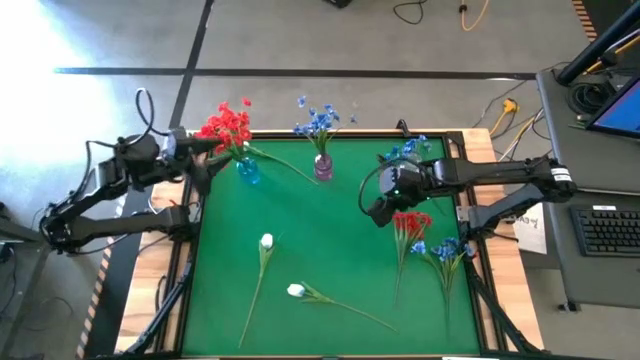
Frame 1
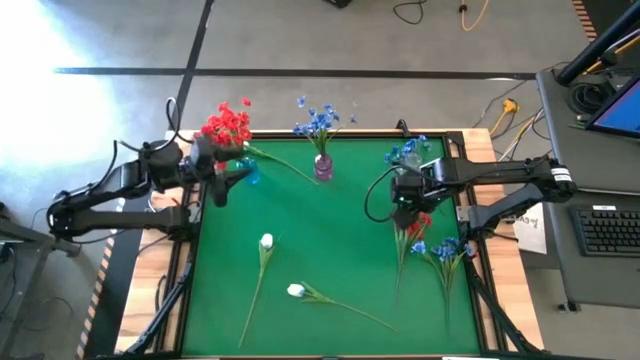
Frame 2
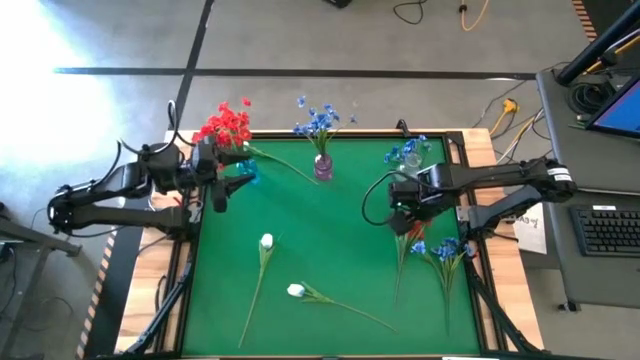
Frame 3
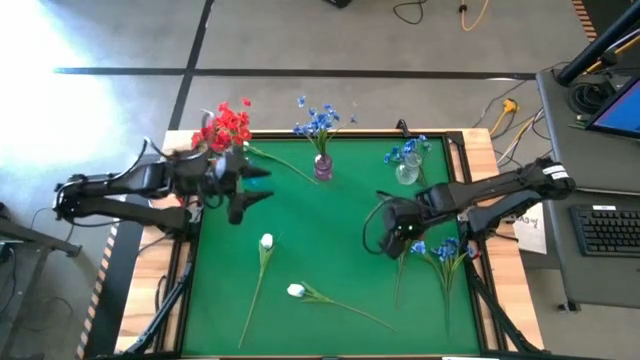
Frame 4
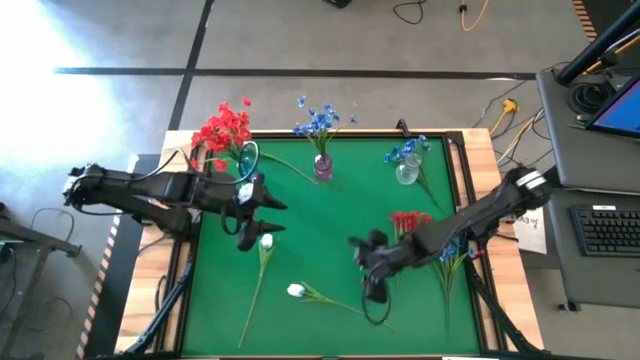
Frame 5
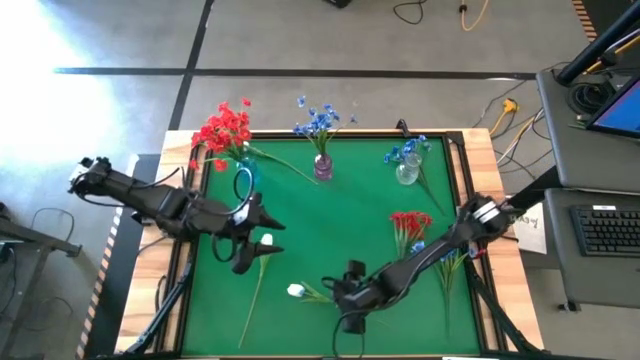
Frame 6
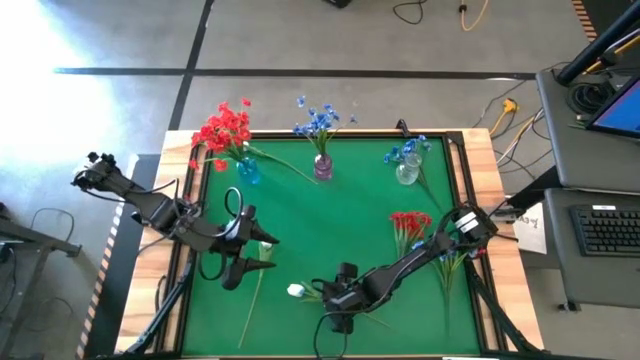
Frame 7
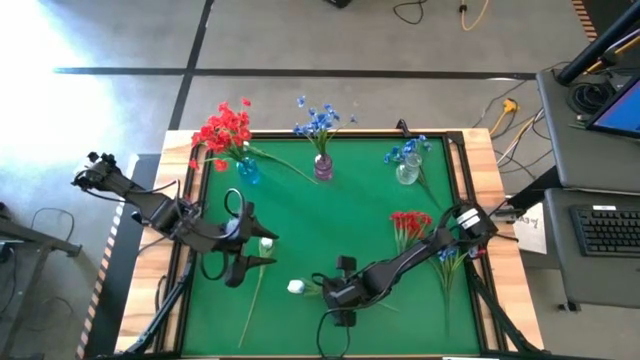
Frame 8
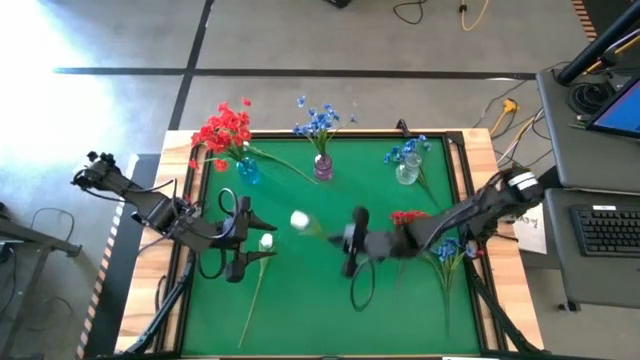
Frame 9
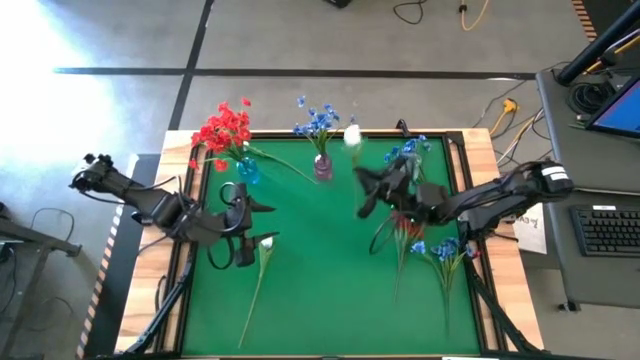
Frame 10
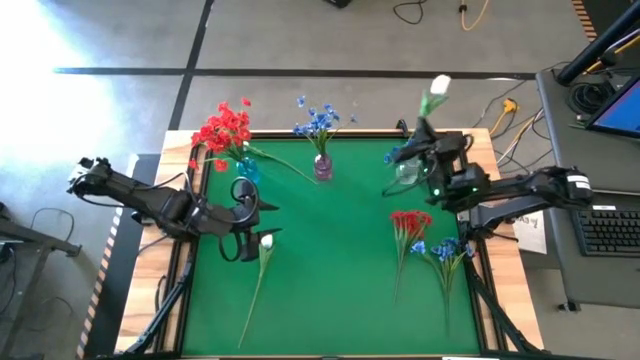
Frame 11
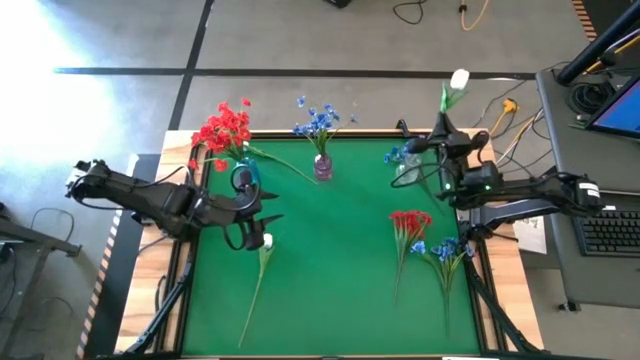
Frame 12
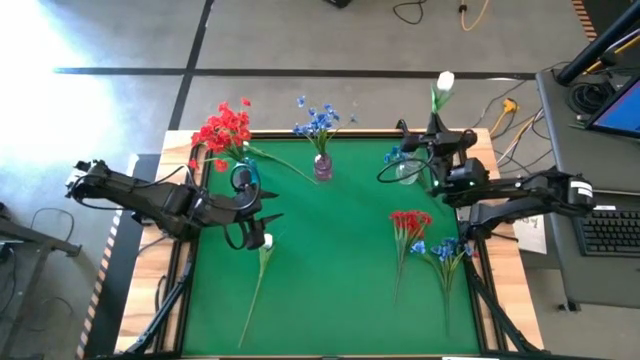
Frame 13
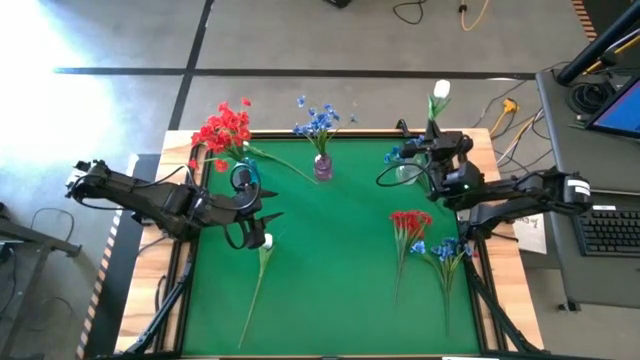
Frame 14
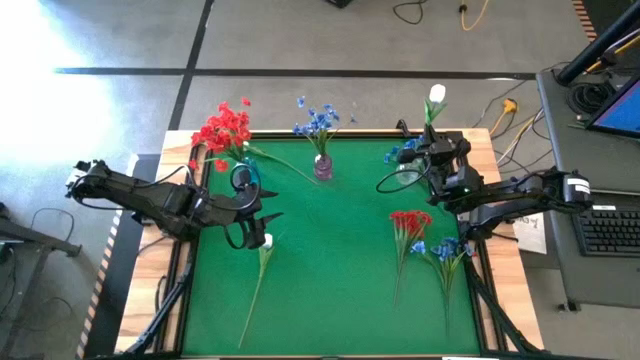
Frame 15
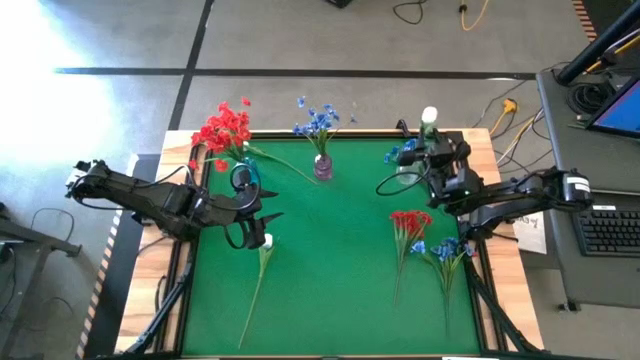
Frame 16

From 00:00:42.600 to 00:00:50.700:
Task: Sort flowers into vase by color
Put the right white flower into the transparent vase

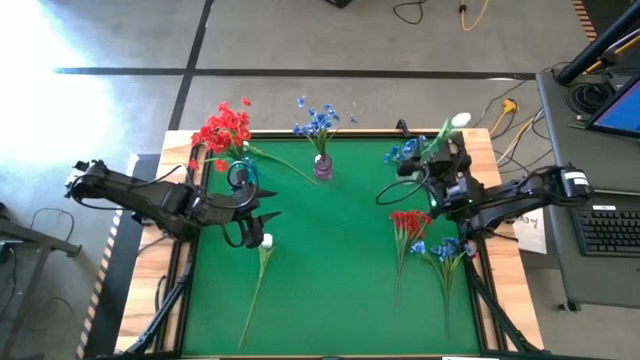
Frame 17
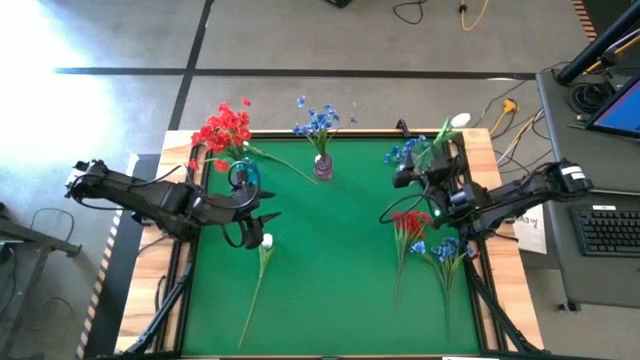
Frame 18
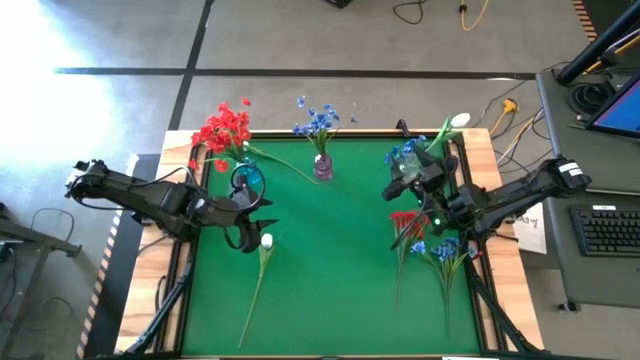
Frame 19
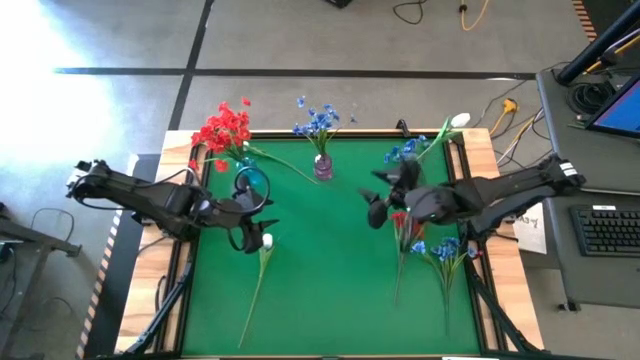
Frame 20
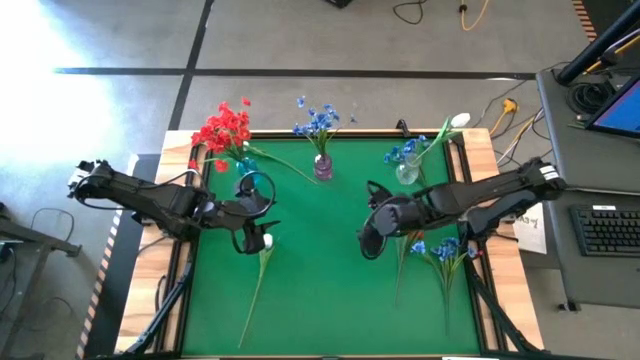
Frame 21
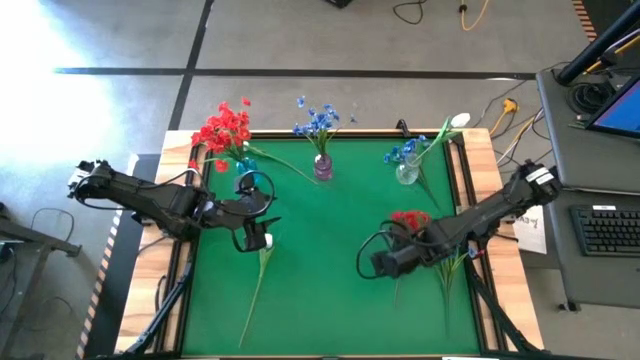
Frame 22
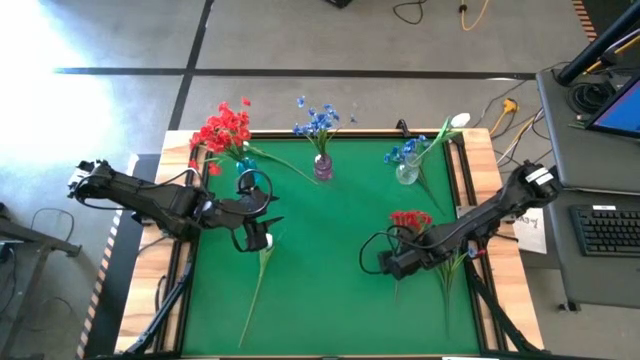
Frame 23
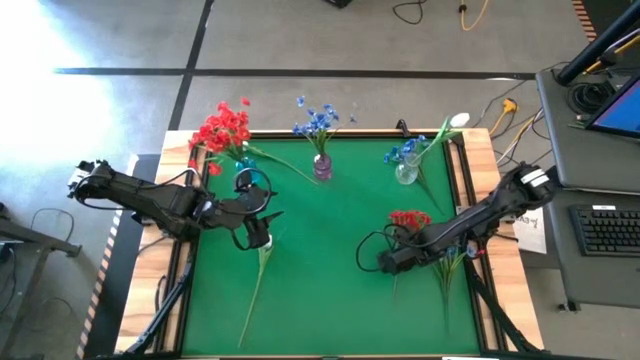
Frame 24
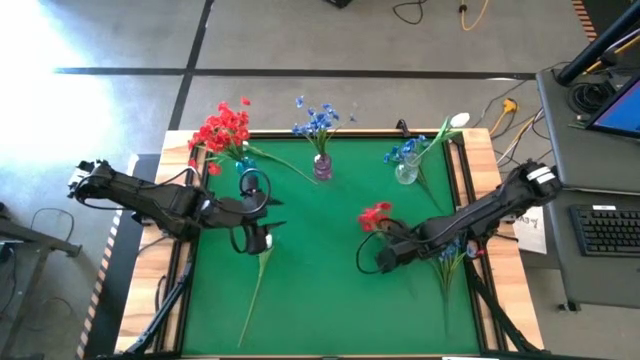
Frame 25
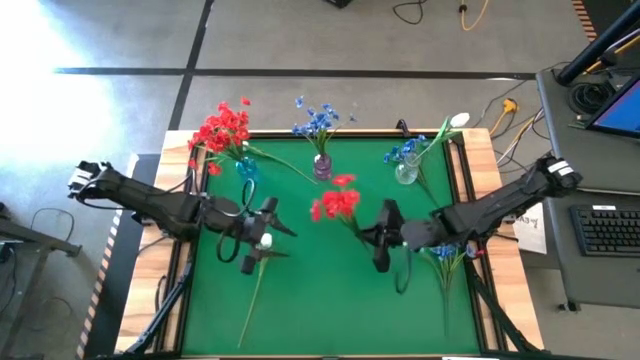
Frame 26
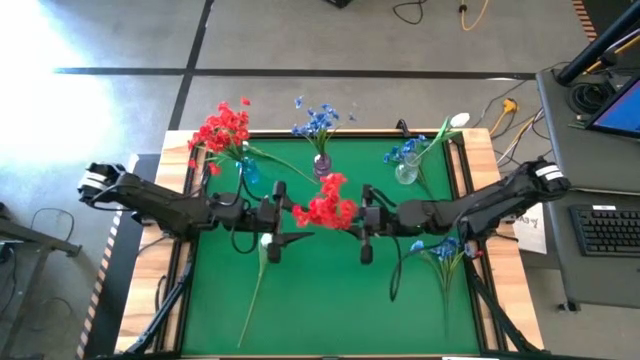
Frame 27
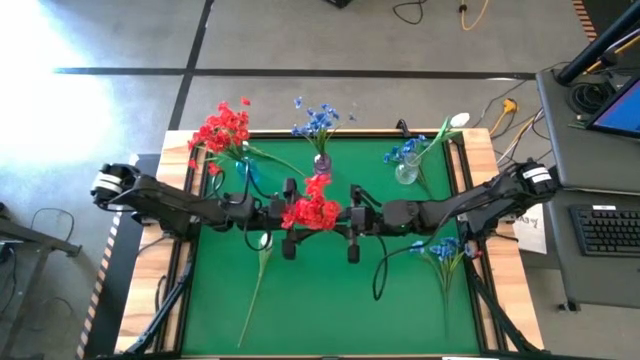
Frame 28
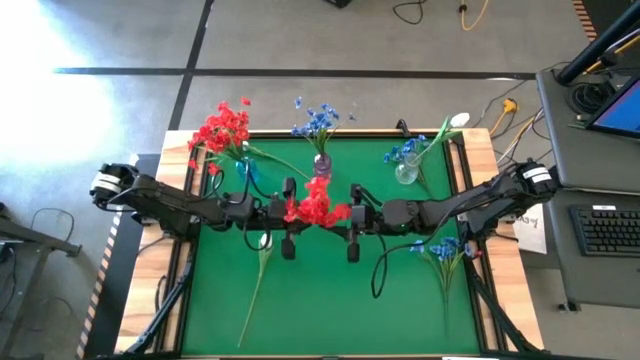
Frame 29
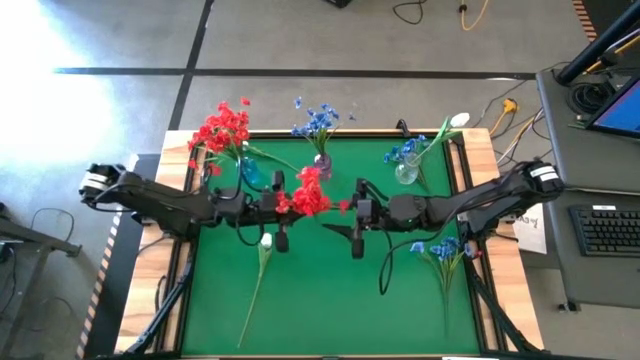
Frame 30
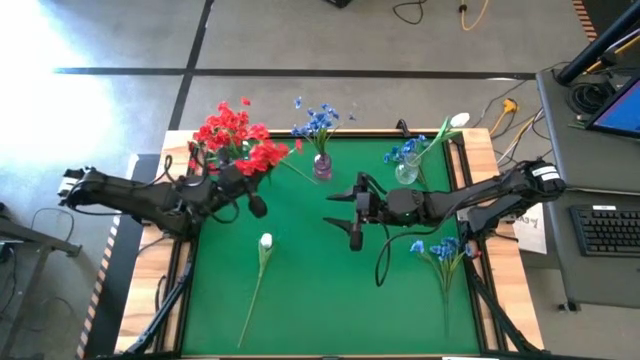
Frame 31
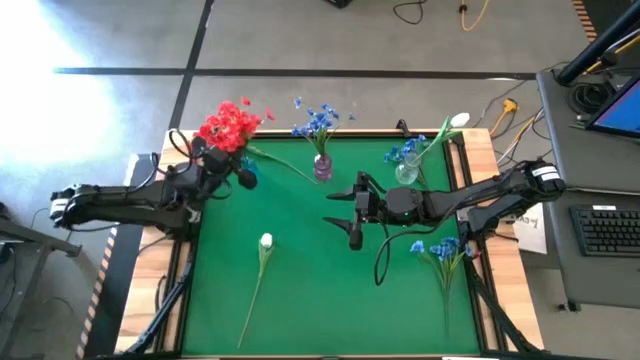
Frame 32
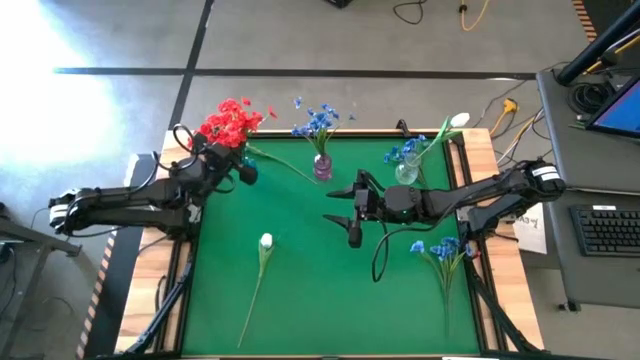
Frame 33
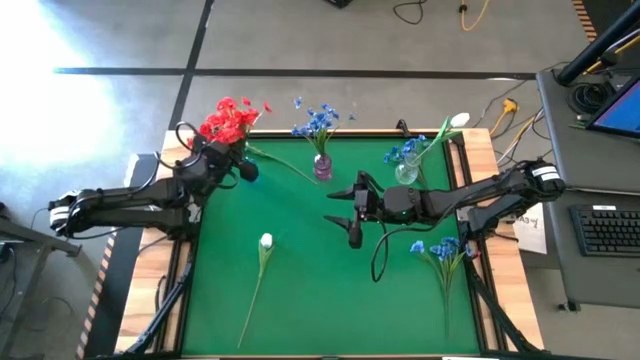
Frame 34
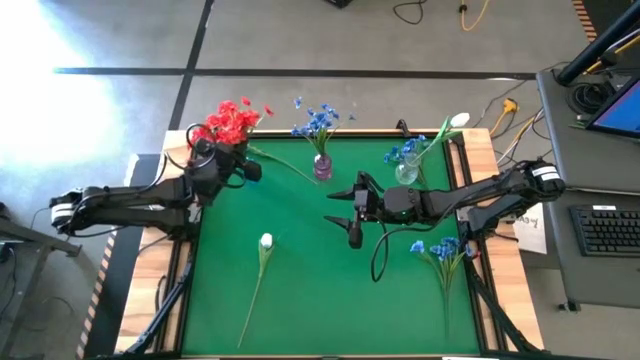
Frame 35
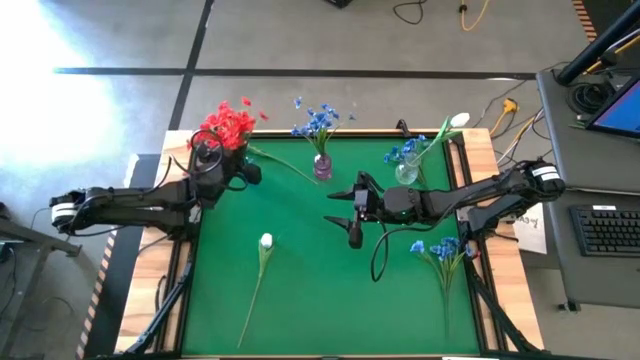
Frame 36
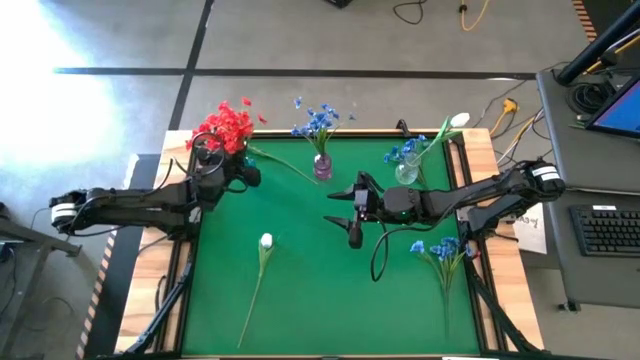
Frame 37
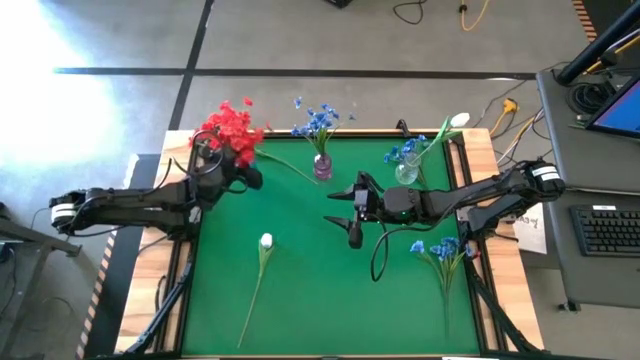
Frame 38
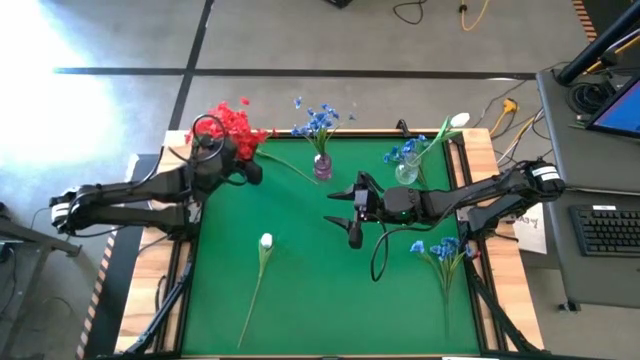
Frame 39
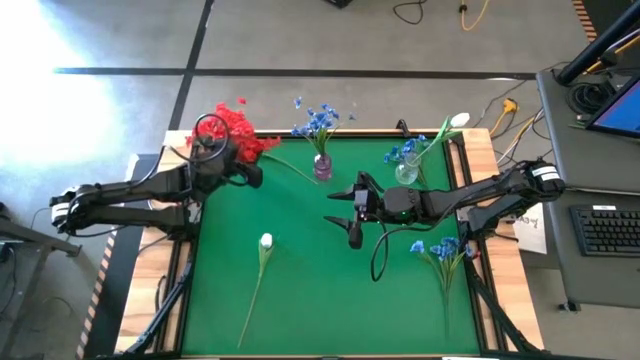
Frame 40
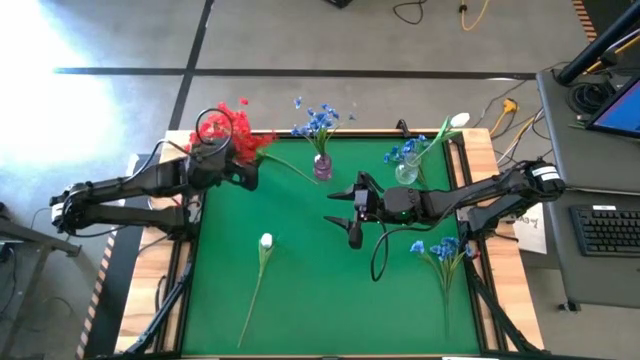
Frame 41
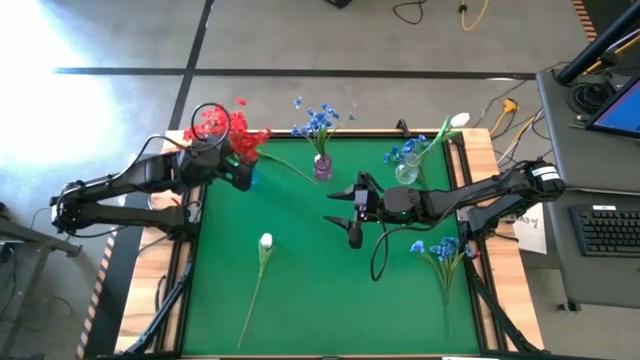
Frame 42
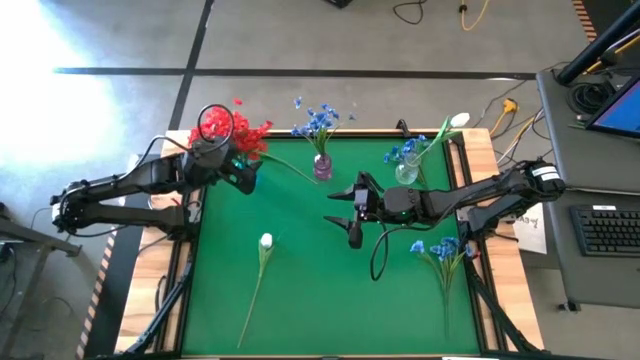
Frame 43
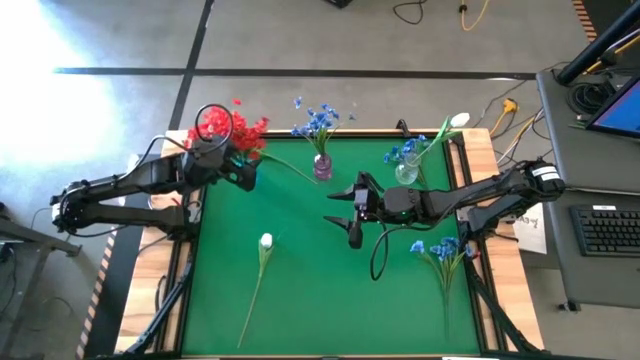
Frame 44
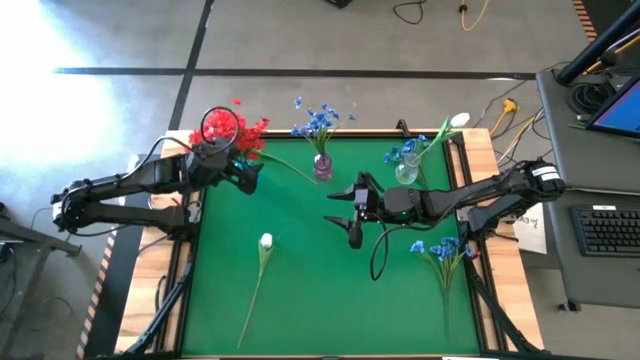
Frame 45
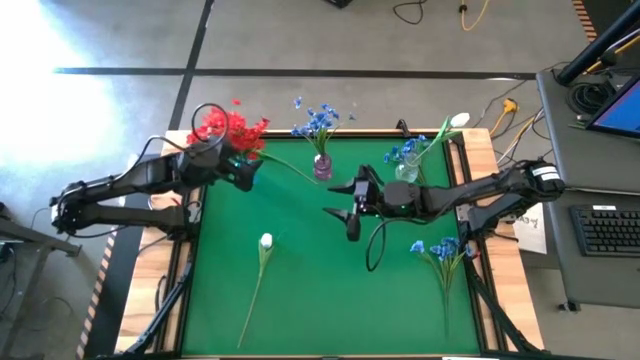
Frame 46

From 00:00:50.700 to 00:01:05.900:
Put the red flowers into the blue vase
